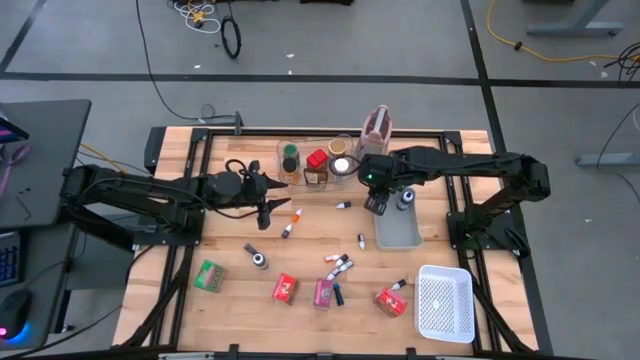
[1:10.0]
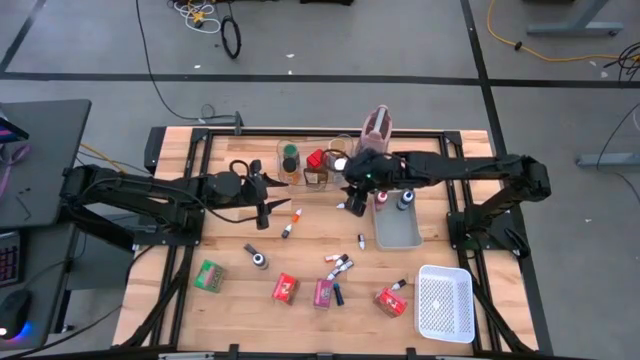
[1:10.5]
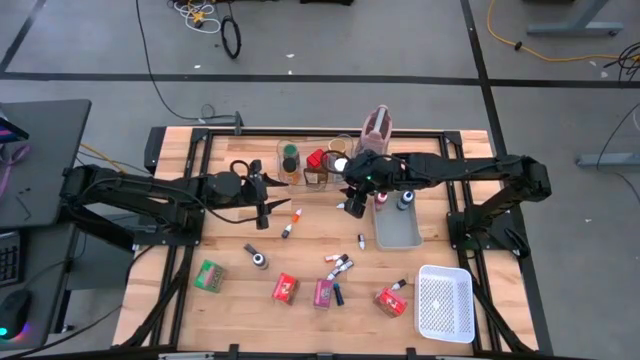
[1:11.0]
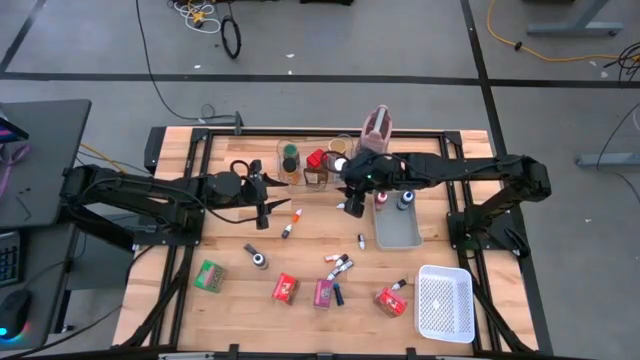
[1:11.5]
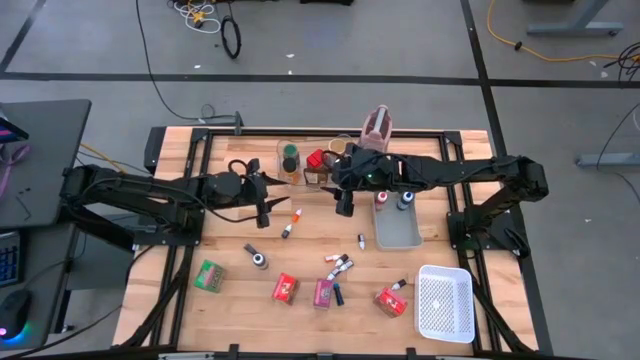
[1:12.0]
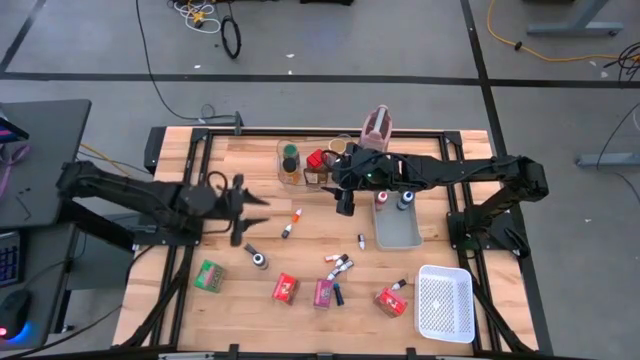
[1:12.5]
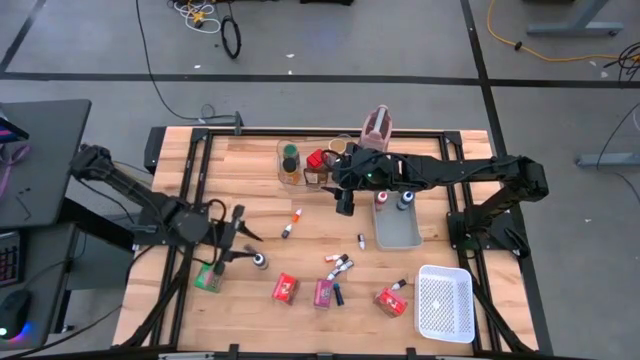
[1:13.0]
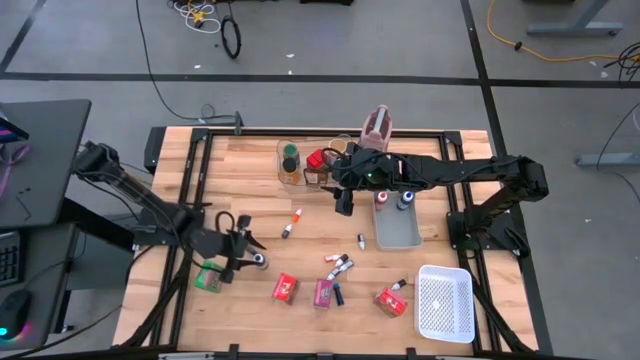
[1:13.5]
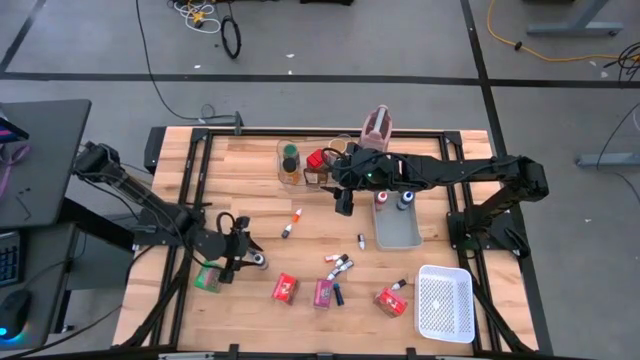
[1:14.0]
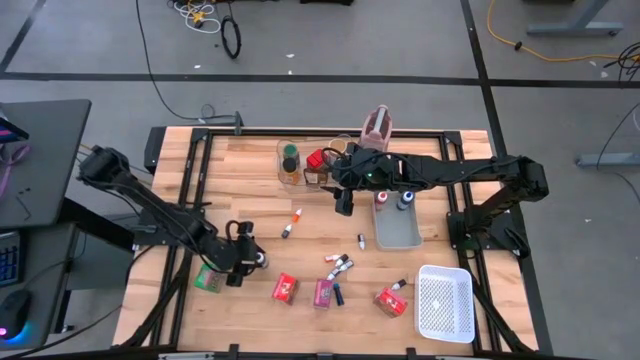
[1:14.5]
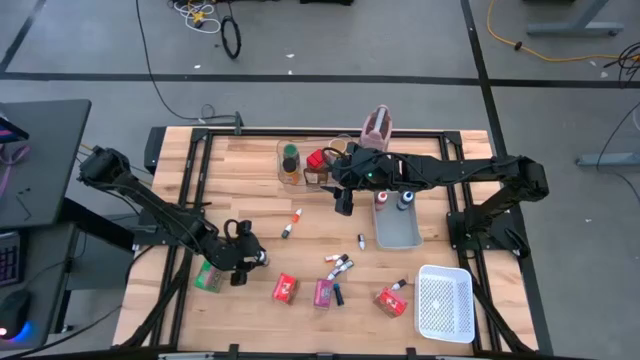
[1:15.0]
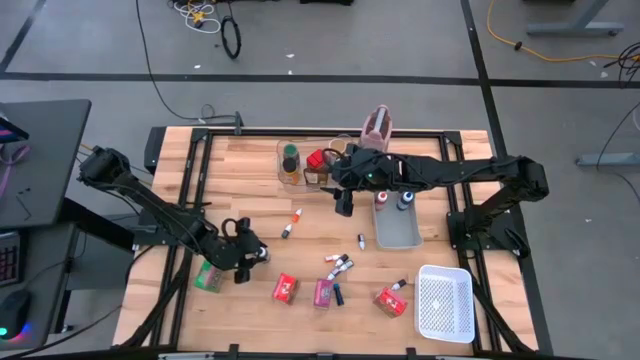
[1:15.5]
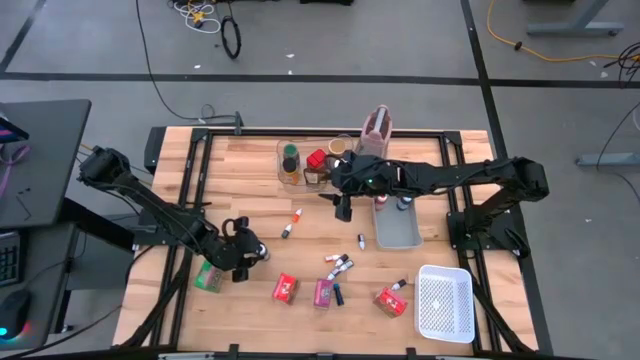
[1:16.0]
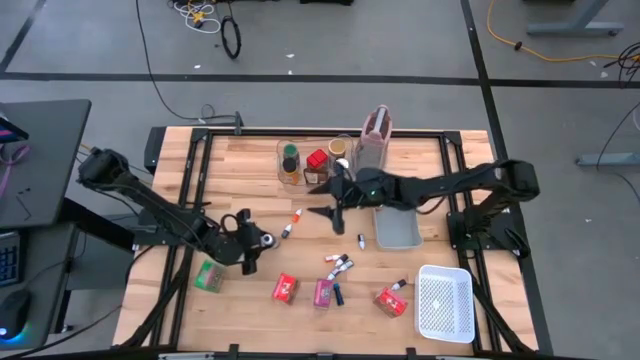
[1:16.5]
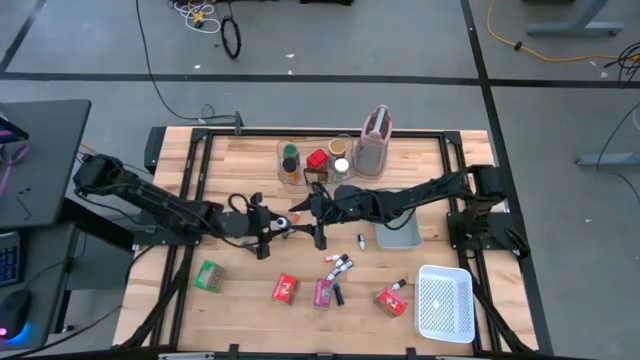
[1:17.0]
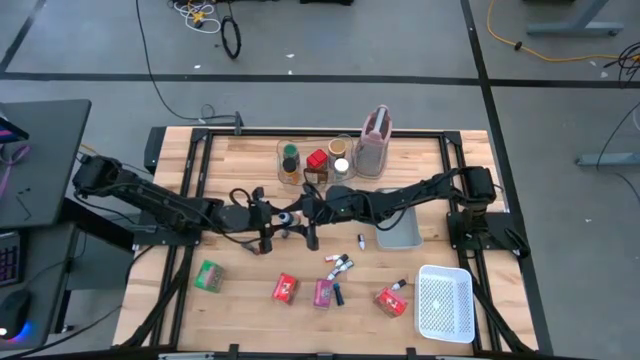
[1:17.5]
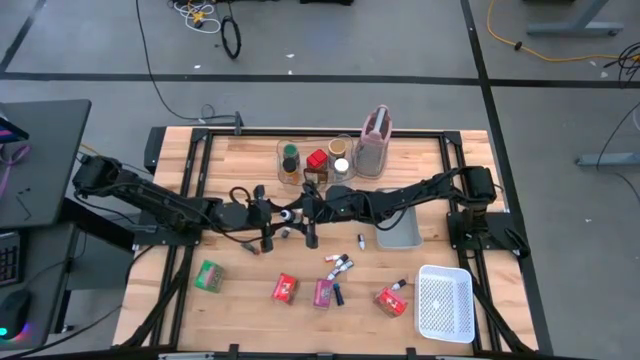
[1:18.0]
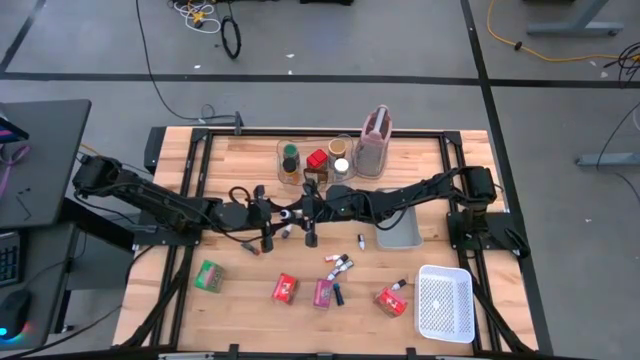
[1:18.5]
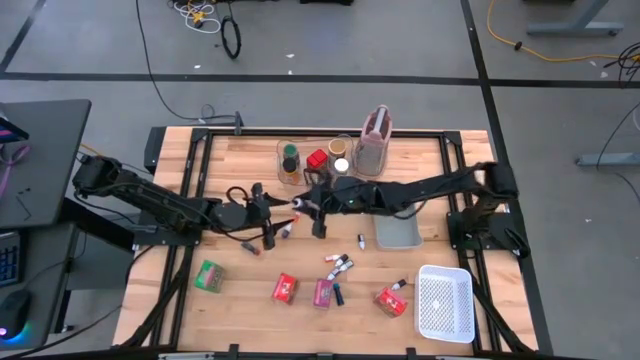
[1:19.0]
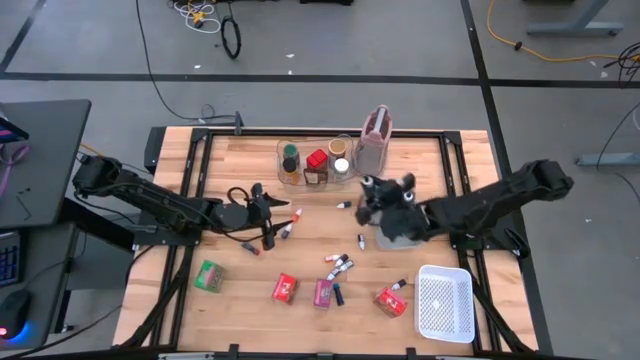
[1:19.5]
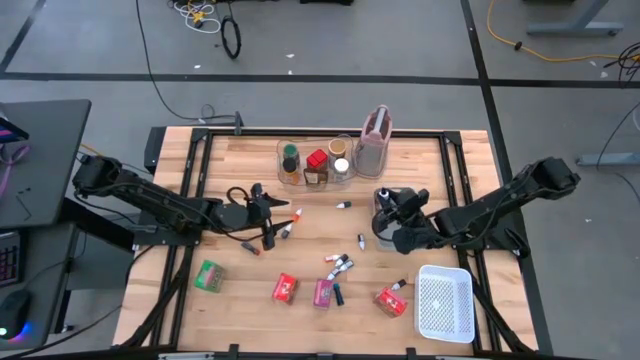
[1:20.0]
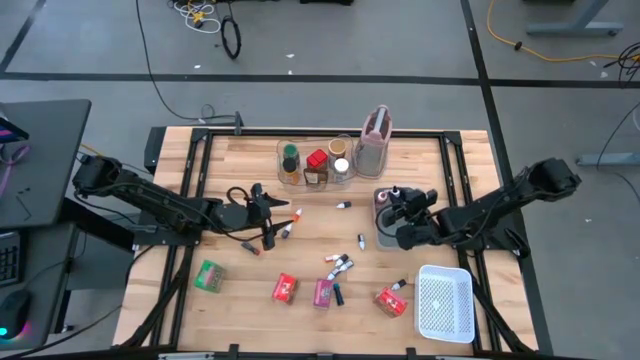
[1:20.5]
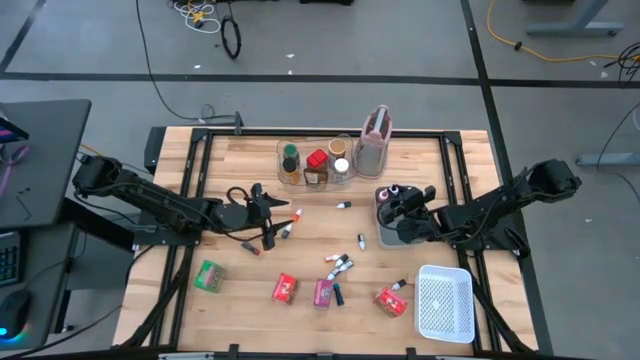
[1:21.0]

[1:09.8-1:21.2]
Task: Pick & Place Kitchen Items
Put the large black food coloring bottle into the gray bin

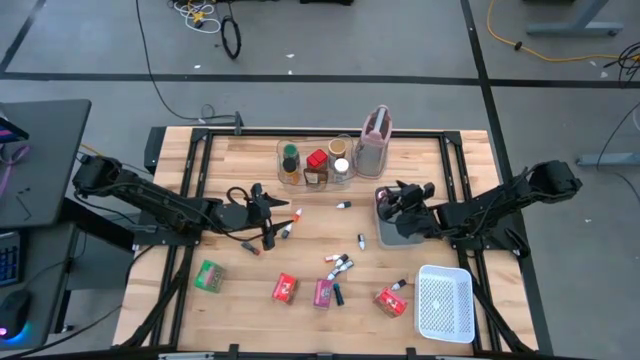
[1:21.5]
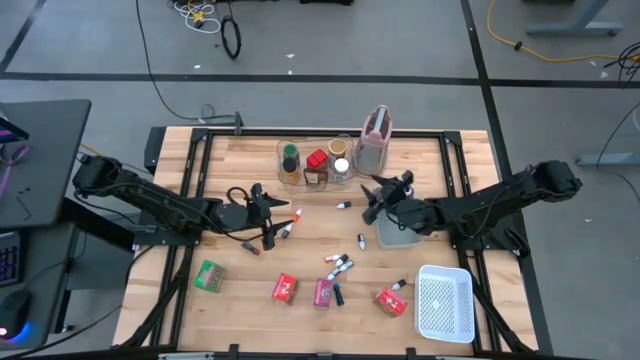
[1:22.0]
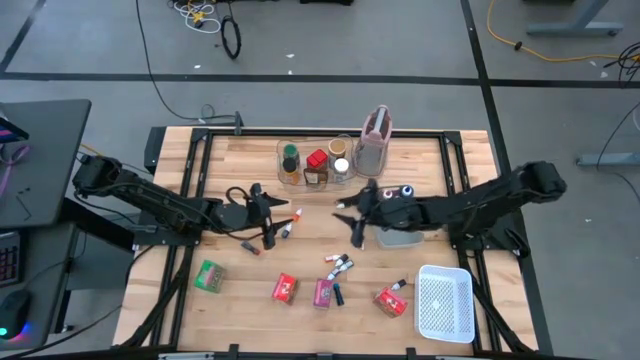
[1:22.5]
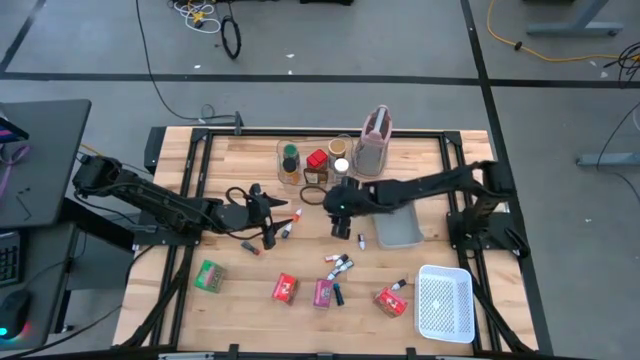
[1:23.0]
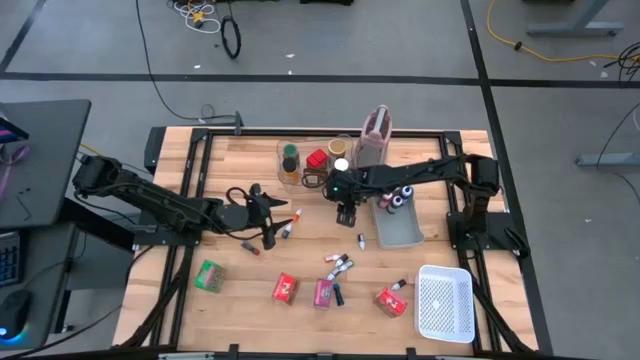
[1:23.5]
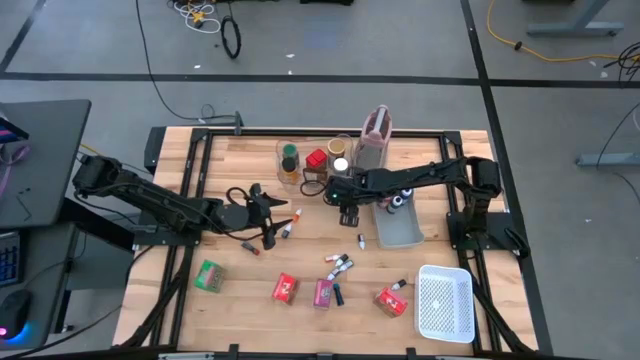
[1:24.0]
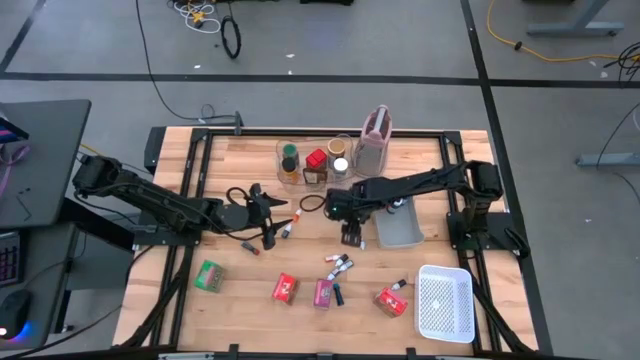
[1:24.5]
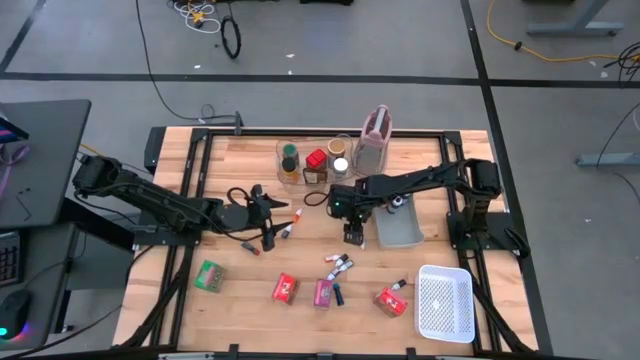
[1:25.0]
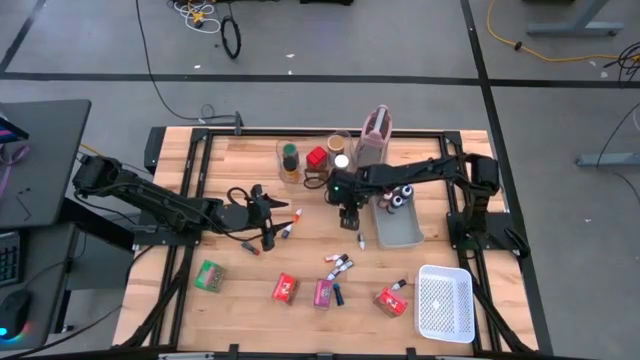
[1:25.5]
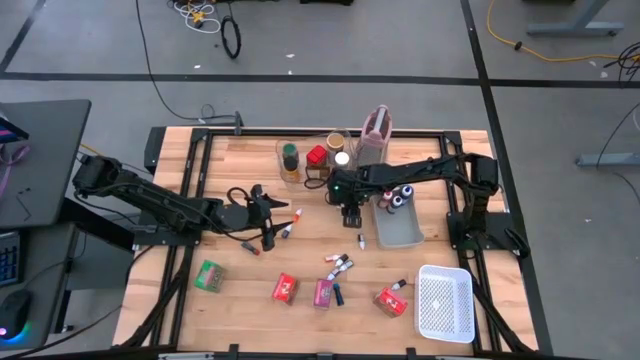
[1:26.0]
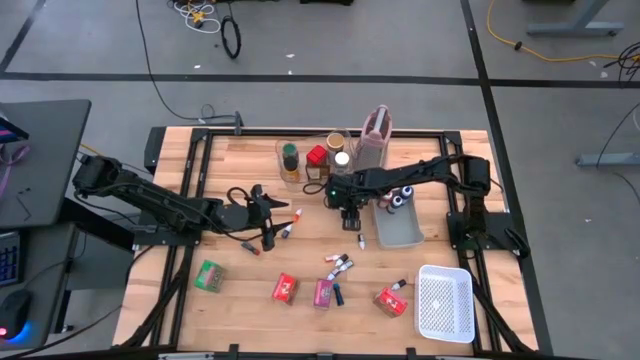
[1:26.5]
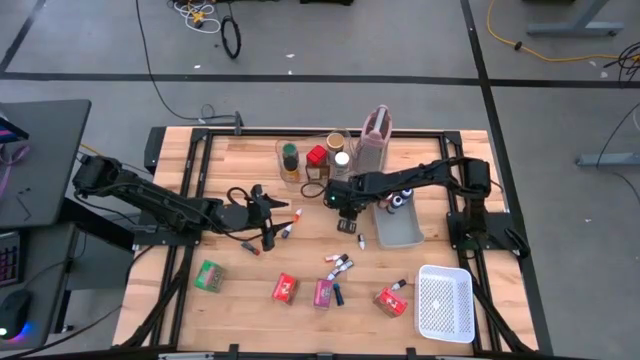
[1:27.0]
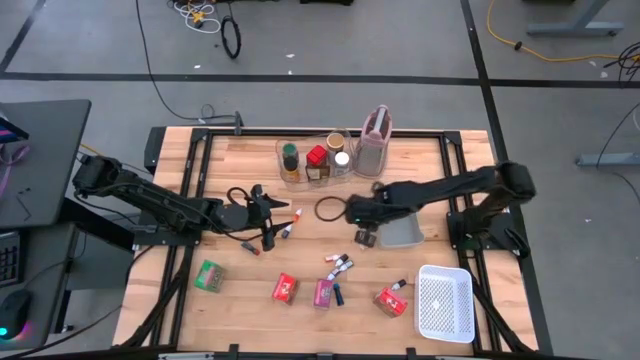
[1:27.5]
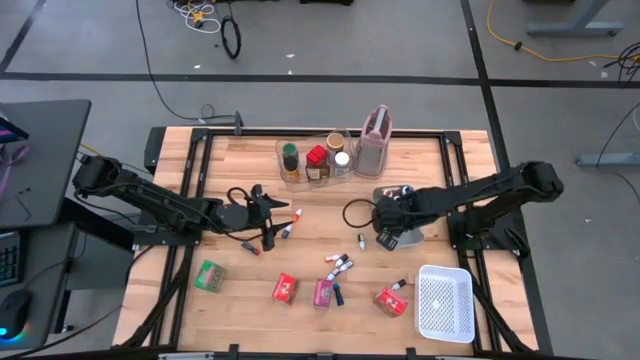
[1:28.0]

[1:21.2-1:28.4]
Put the small green food coloring bottle into the gray bin
